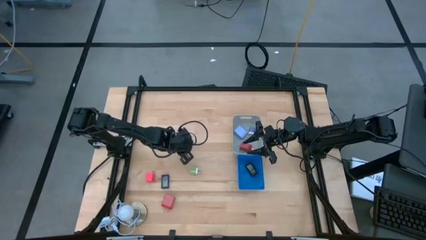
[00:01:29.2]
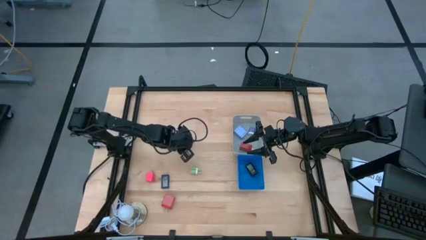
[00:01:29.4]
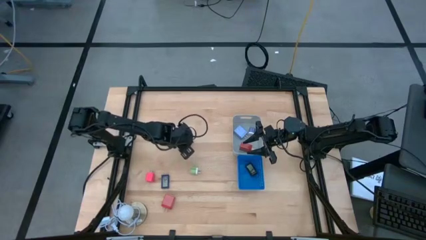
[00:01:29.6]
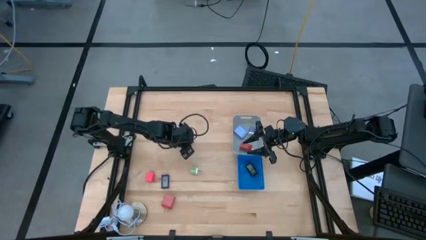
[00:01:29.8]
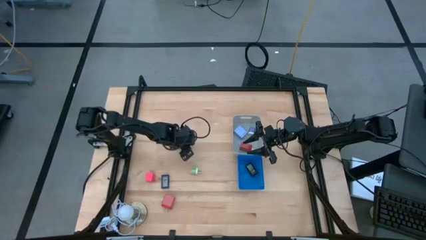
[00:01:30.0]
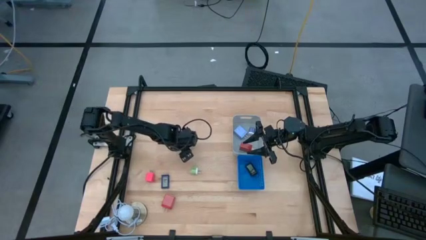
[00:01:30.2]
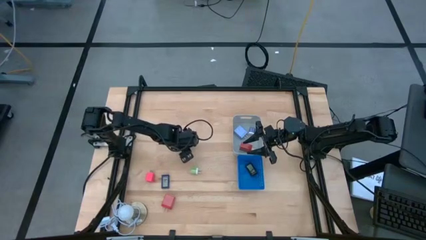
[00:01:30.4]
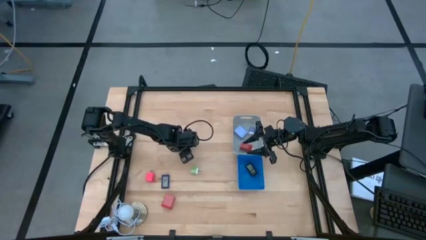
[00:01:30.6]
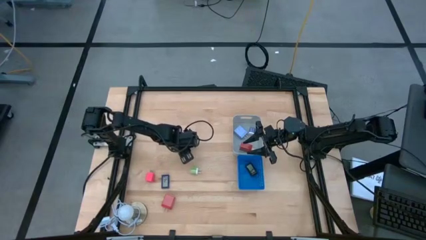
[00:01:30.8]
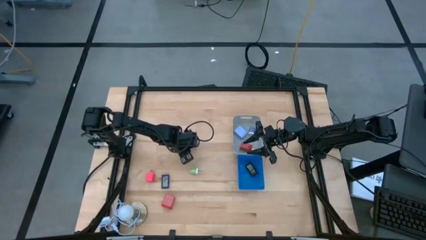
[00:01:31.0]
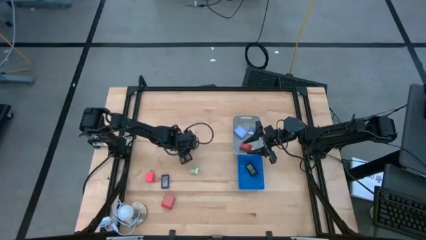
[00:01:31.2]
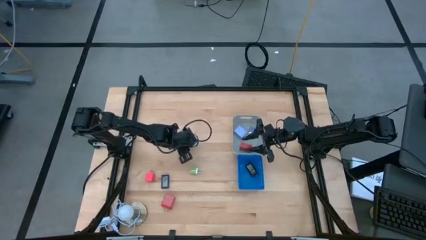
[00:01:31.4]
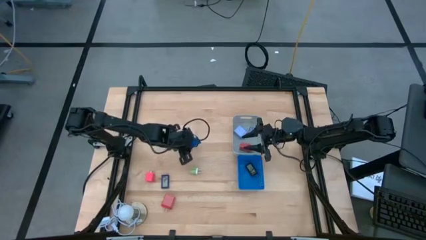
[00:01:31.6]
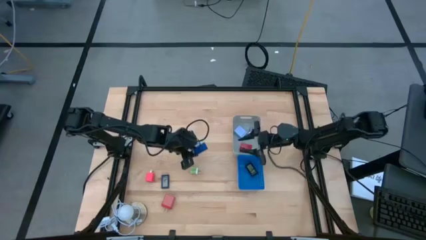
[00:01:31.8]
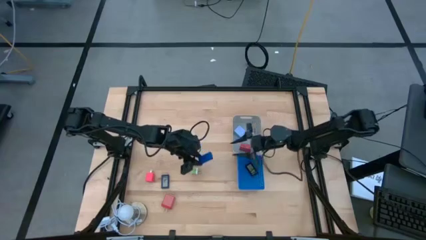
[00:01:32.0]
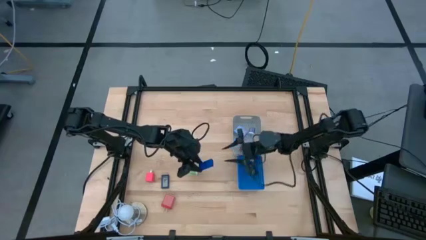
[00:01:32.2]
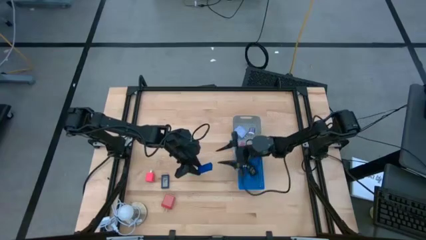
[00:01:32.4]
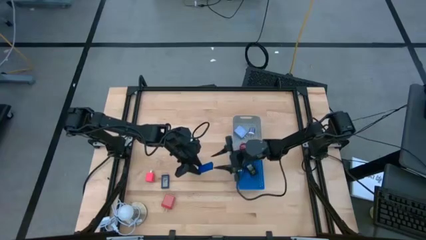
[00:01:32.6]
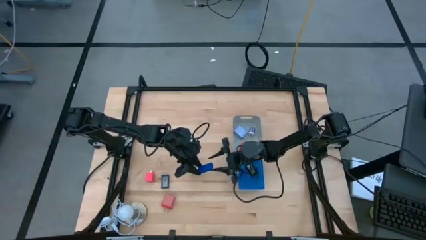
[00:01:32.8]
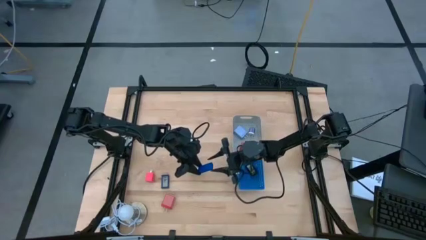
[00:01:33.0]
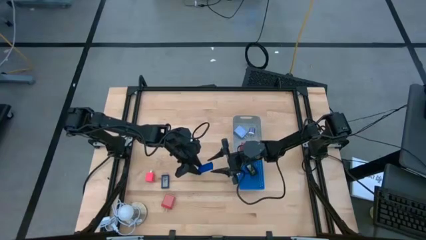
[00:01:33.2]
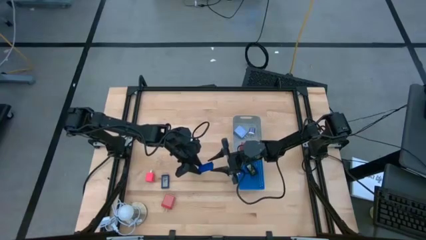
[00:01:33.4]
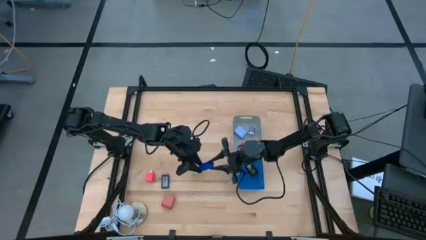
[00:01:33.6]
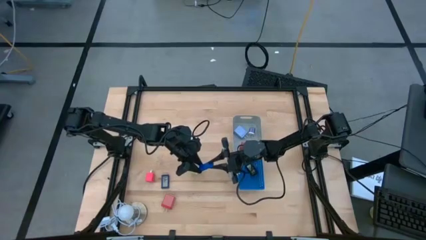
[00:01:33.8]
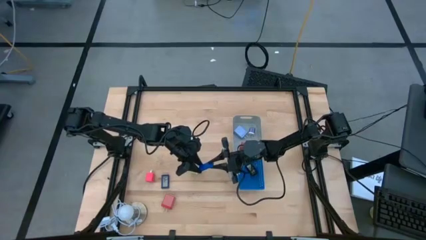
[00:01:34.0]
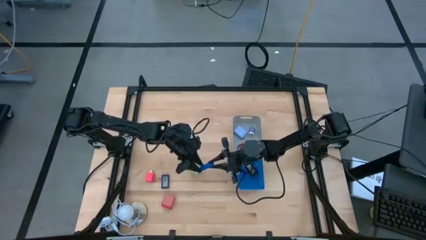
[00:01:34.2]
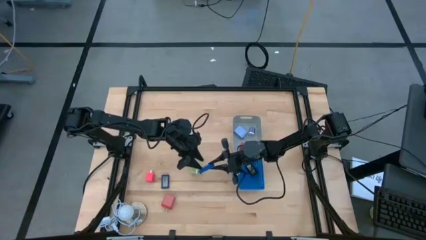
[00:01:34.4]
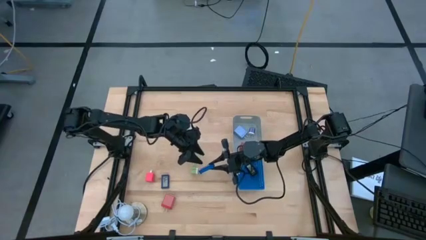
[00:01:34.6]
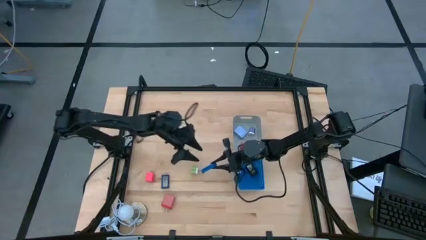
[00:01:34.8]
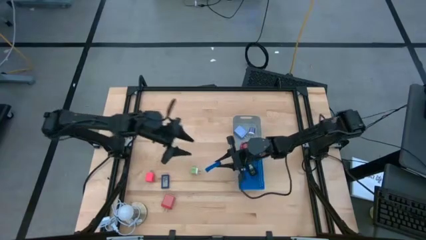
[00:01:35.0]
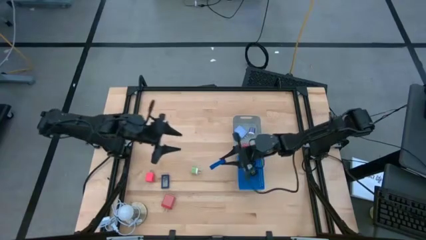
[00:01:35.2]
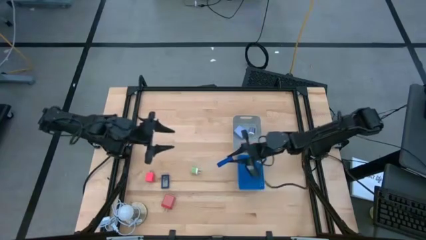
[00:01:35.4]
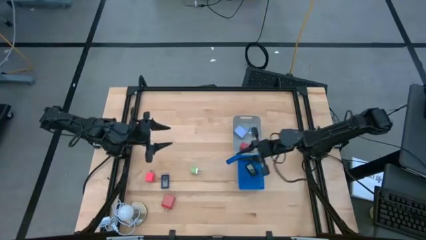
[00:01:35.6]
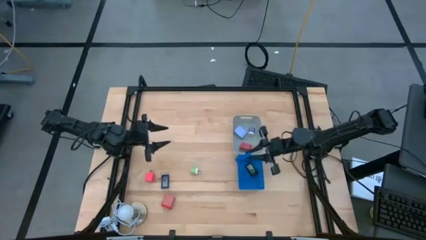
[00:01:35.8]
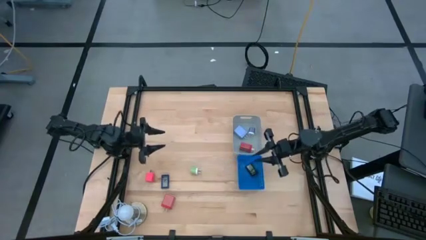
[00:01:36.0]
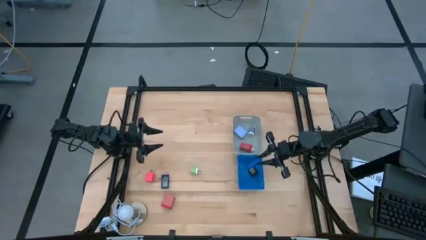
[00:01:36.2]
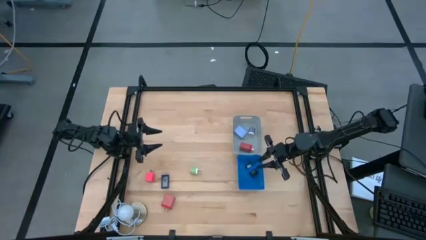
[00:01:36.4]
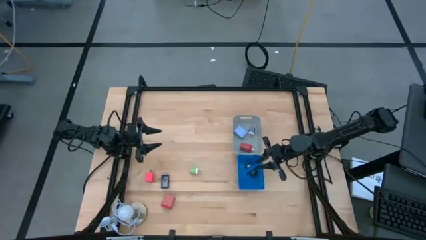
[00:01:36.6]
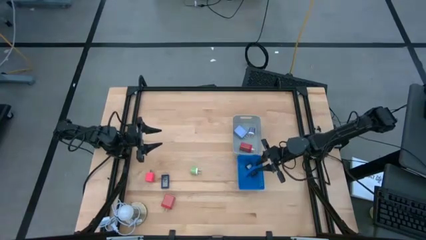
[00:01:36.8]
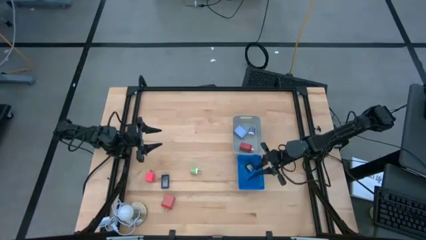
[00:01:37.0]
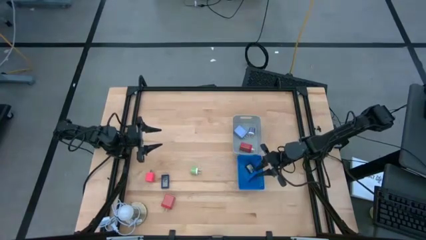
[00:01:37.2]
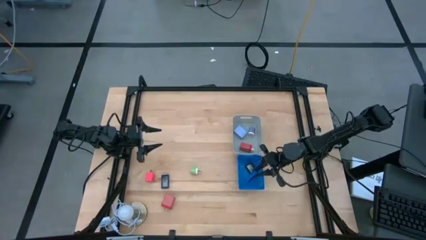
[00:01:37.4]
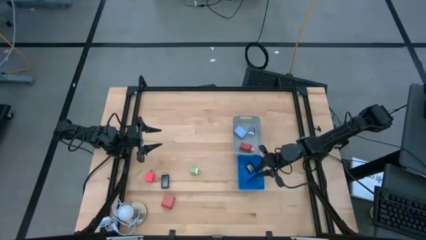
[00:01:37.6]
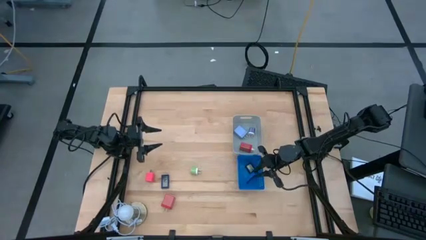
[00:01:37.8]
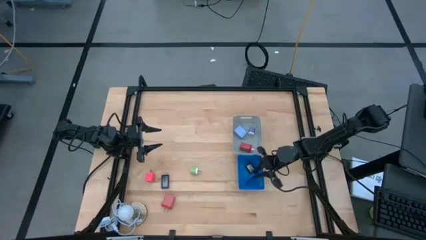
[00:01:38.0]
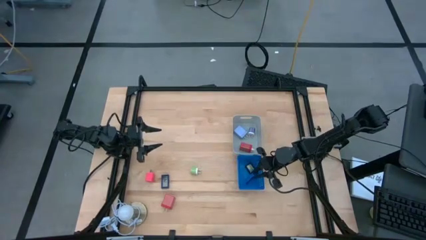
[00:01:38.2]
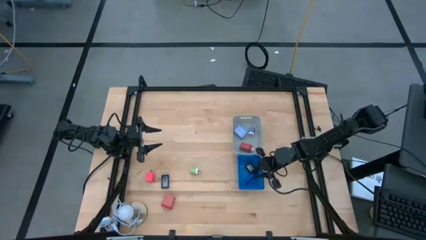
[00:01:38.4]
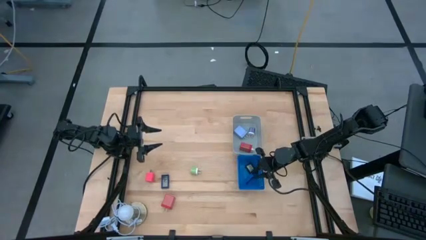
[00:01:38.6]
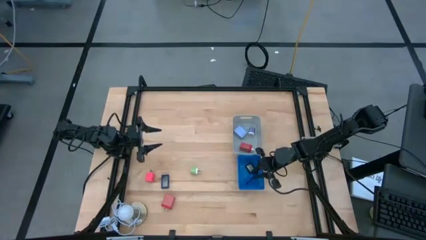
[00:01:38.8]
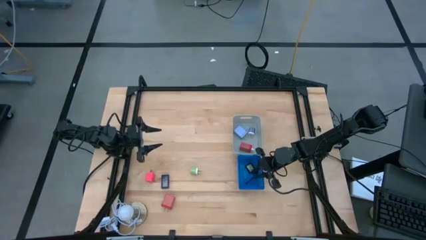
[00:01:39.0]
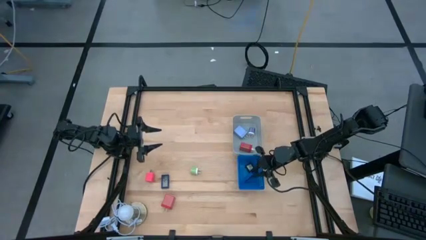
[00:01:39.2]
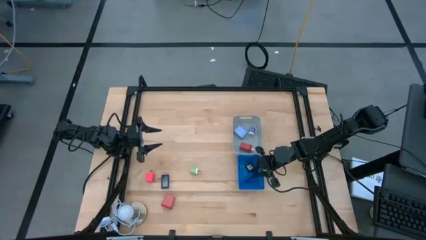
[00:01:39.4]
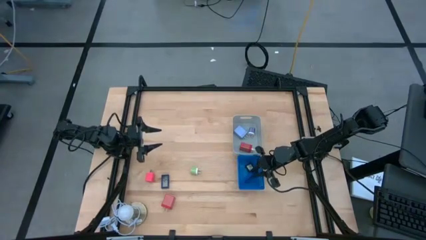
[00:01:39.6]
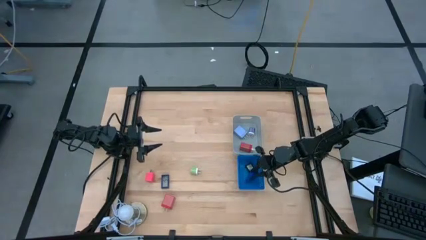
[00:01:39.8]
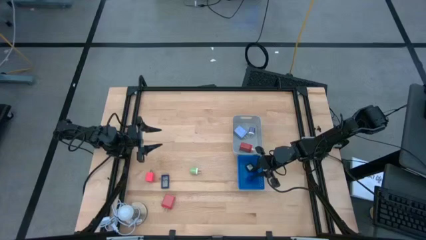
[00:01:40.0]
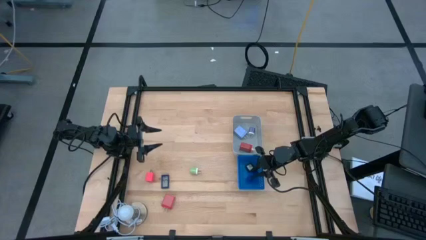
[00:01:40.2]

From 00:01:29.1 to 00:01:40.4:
Task: Pick & Place Office items
Put the top blue digital clock into the blue bin

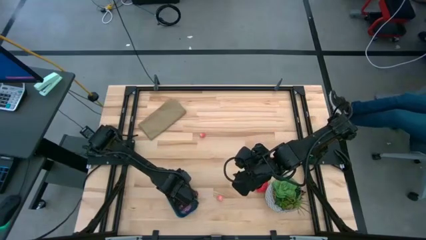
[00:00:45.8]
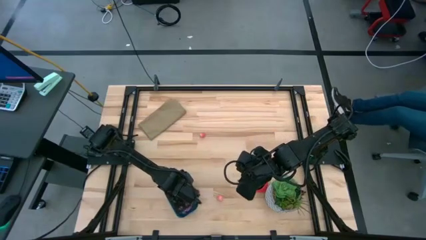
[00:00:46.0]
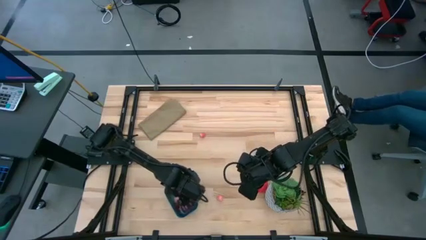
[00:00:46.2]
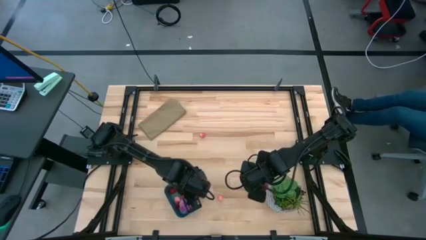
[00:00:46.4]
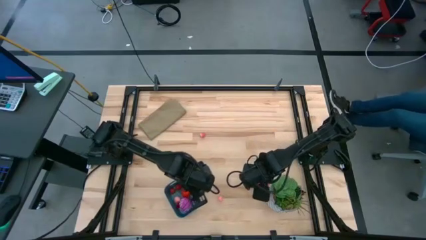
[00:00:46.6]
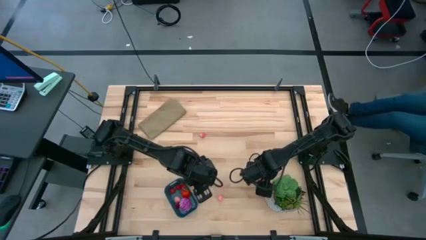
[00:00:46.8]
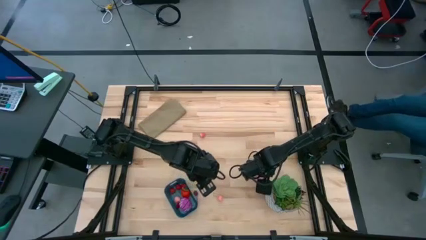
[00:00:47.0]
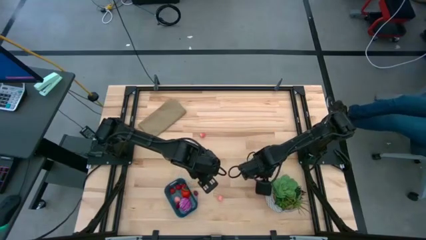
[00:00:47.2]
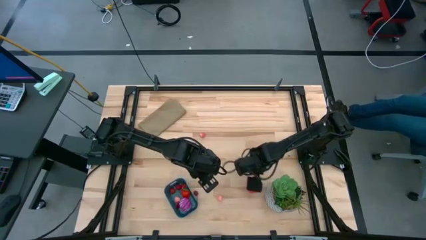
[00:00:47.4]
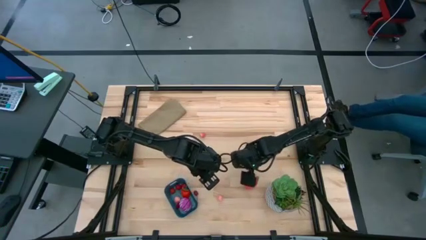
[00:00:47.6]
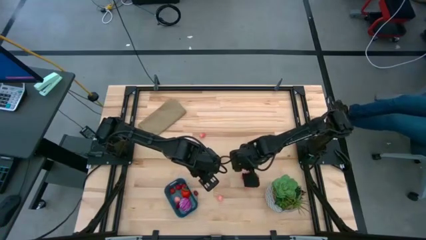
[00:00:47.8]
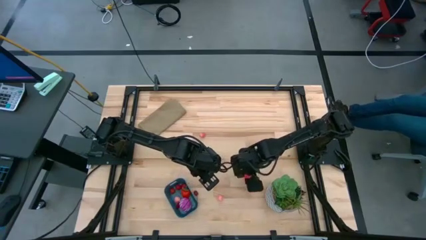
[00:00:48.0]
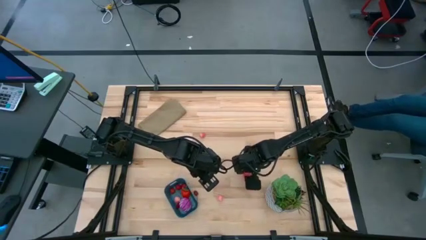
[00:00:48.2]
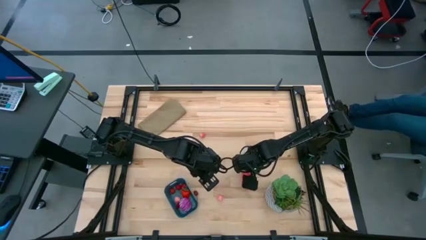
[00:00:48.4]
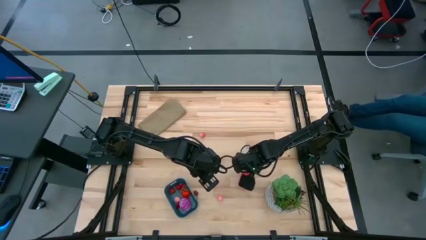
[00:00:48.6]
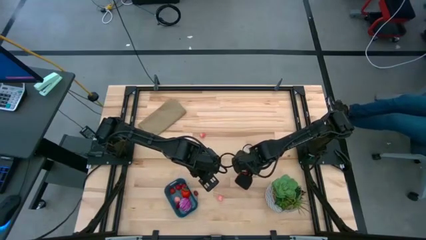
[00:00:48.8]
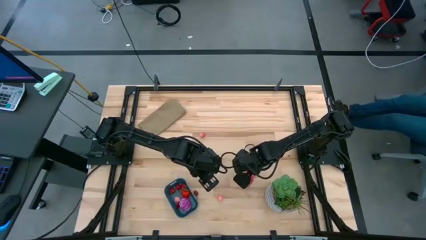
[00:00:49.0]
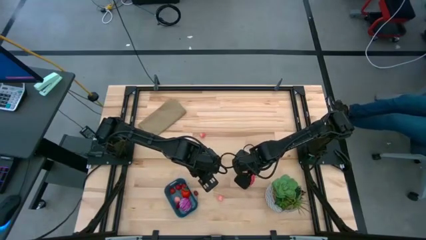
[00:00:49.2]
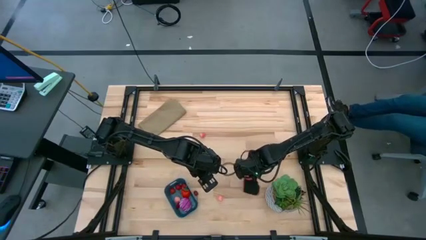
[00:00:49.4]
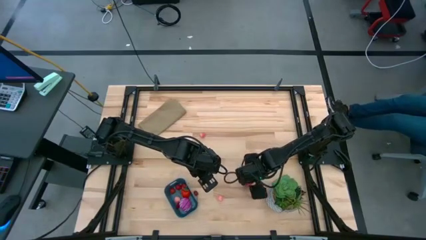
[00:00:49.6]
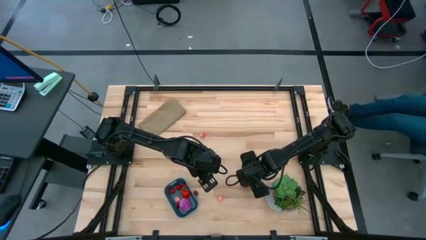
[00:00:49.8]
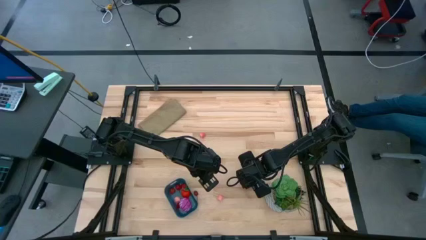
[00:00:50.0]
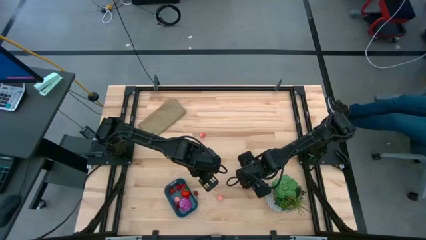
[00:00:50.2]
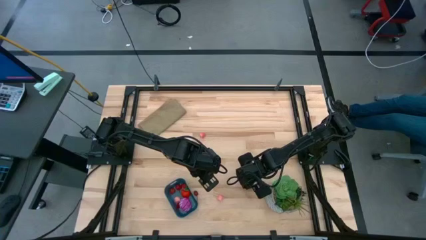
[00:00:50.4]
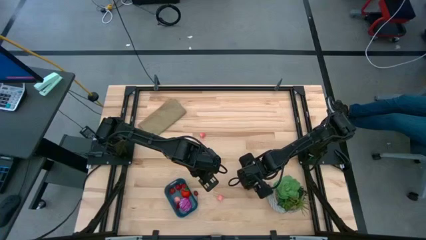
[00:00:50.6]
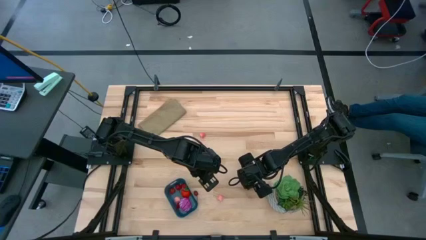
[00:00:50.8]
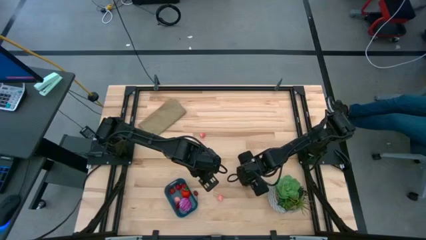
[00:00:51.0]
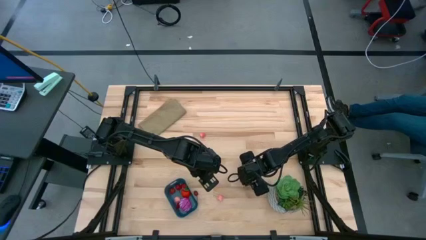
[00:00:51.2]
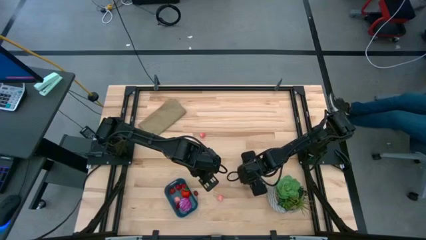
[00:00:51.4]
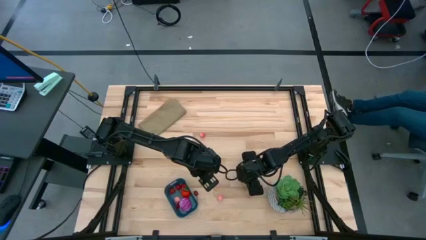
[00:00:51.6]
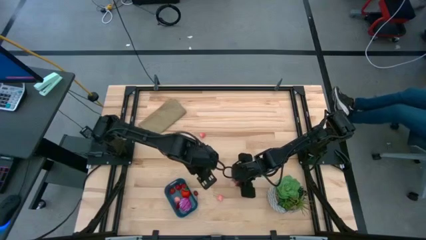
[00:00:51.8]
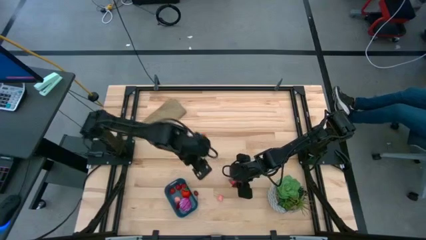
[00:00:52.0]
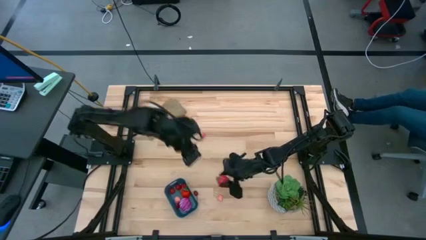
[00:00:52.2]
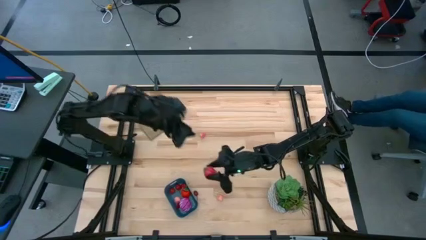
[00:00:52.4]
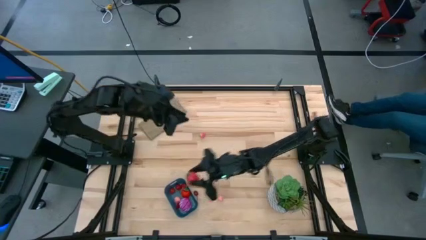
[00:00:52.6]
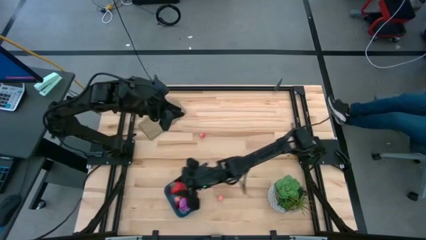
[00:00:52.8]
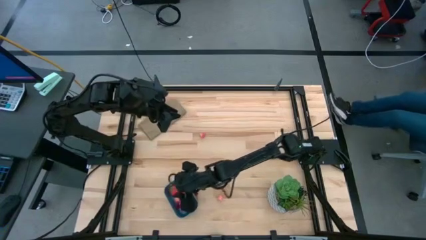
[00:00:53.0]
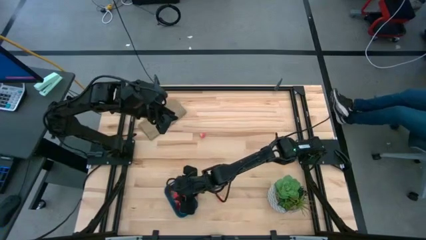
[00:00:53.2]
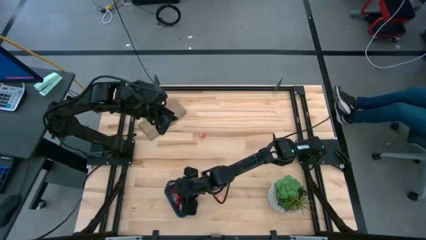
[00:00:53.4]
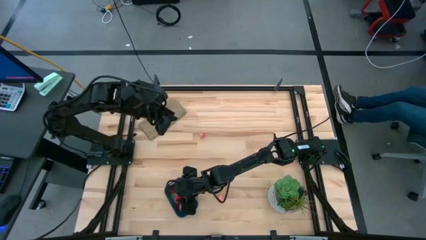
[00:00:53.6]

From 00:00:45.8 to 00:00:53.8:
Task: Pick and placing Produce into tupperware
Put the red dragon fruit into the blue bin
